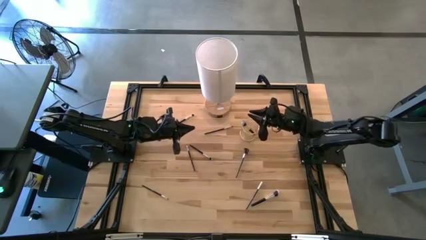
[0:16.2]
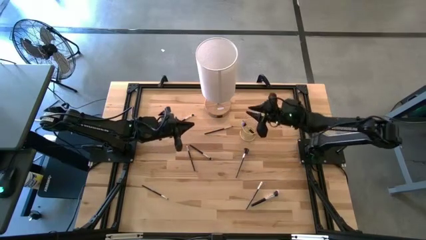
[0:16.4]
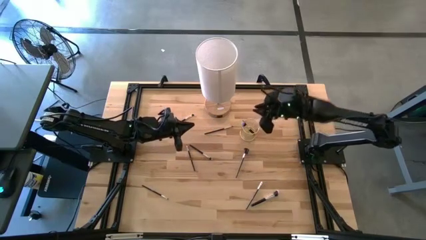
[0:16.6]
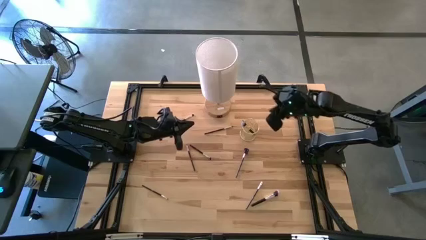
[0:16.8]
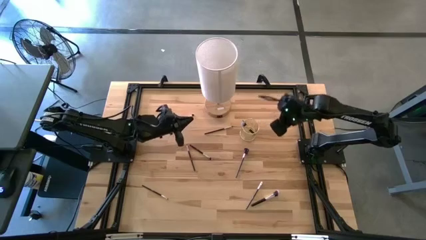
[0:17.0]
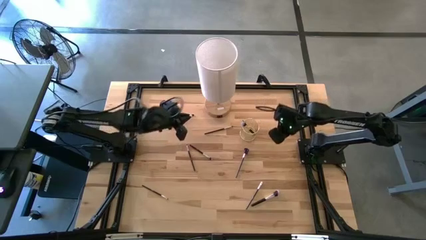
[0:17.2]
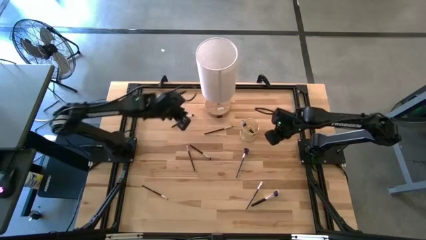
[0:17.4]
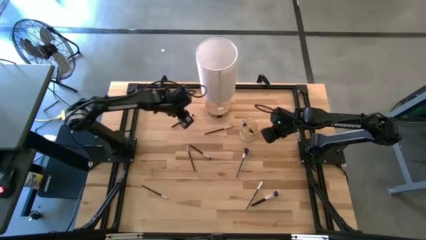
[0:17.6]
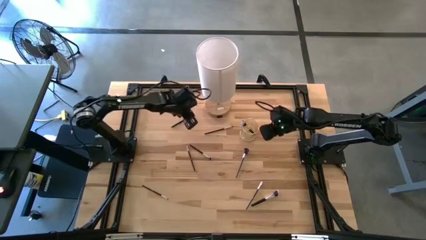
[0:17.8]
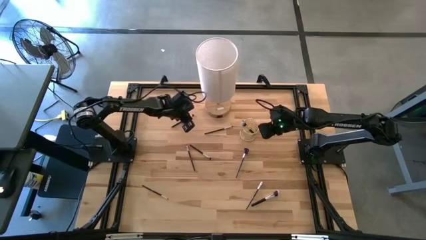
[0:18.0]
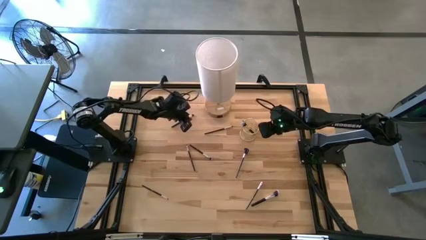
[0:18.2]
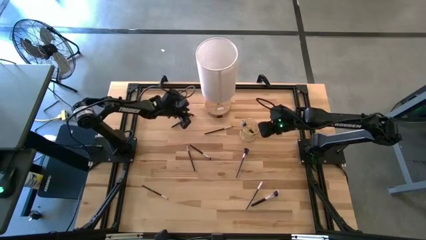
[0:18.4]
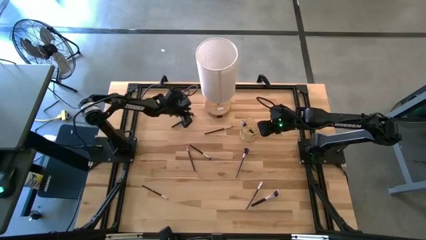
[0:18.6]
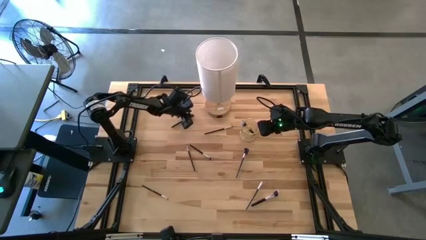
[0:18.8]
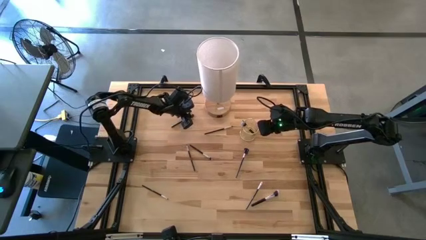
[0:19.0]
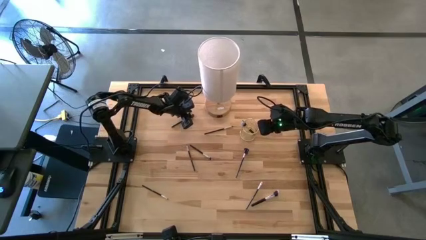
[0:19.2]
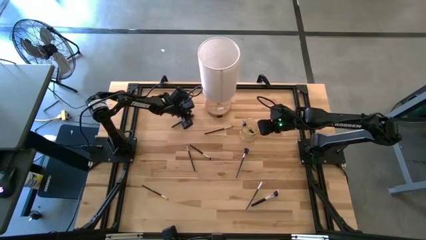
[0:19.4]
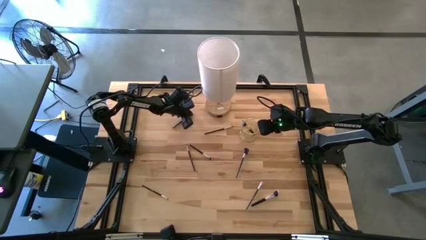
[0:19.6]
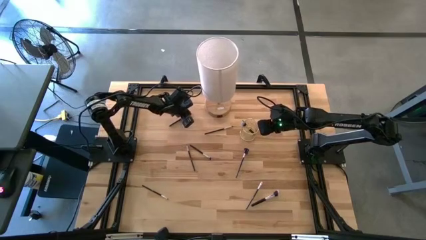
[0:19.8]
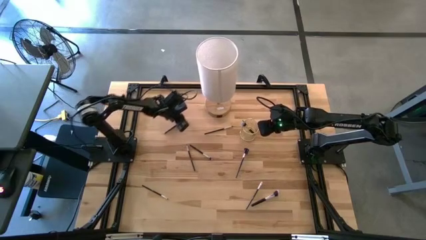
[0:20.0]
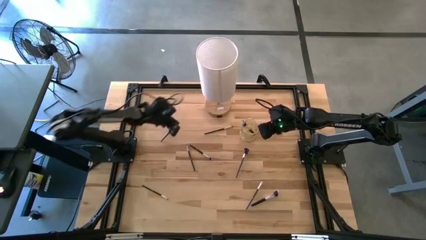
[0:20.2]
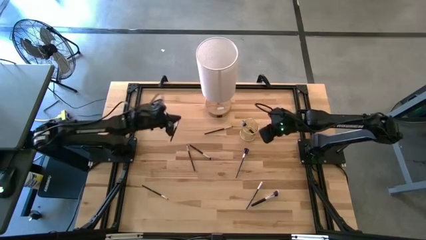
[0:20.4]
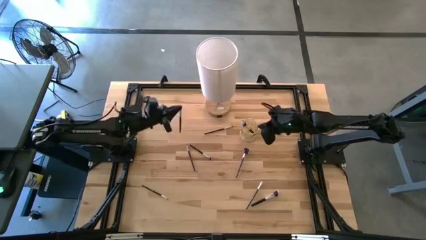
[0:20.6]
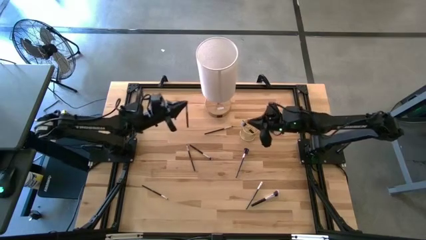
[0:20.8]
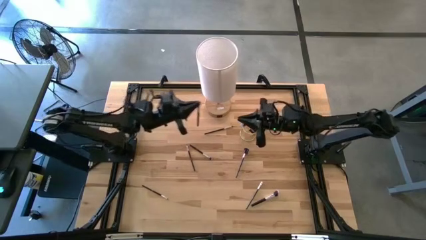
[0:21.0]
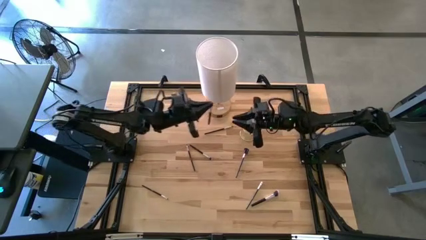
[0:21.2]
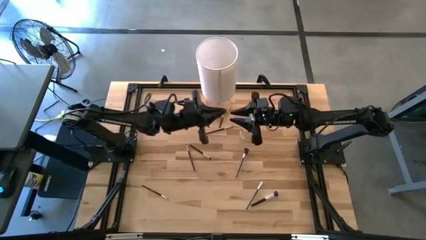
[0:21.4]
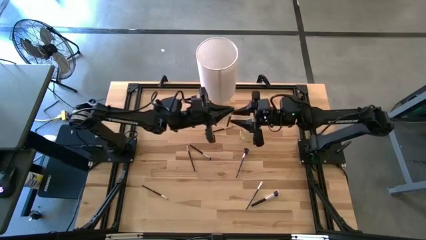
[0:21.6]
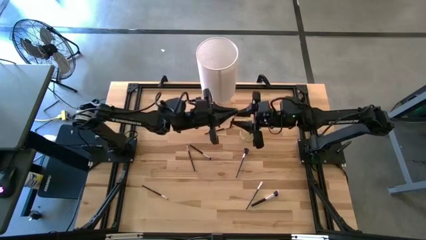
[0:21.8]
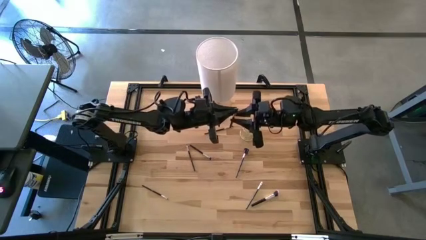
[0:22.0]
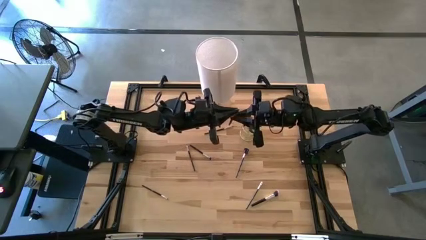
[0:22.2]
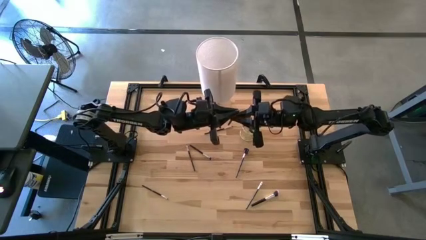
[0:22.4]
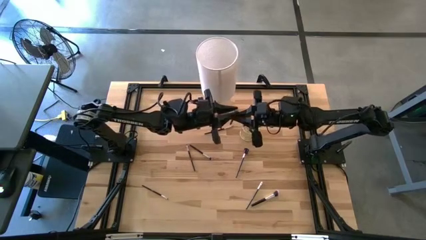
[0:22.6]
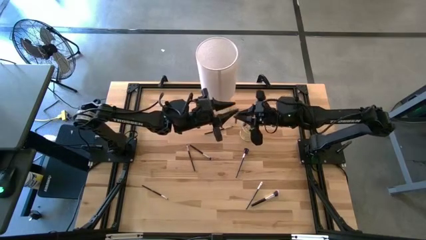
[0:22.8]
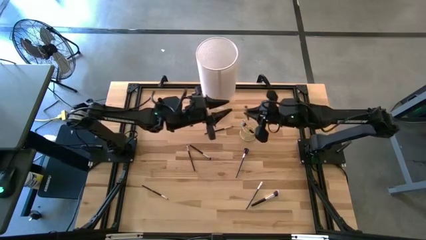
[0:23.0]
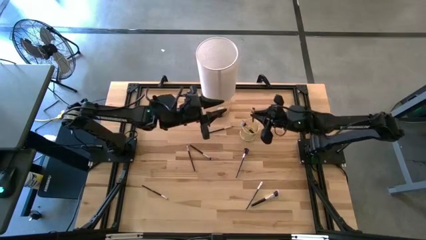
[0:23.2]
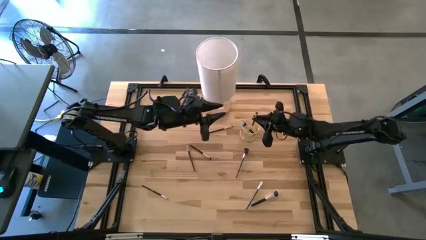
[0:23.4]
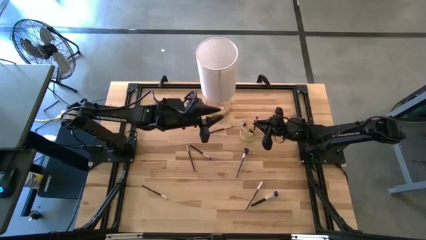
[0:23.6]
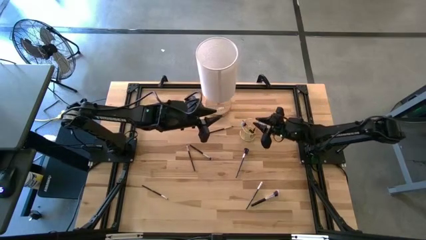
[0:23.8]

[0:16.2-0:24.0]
Task: Pick & Place Makeup Brushes
Put the black eyeshadow brush into the makeup brush holder

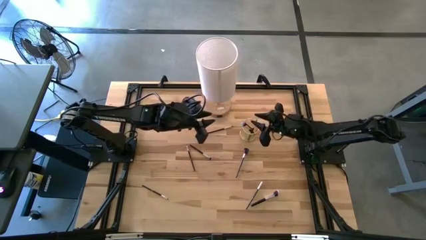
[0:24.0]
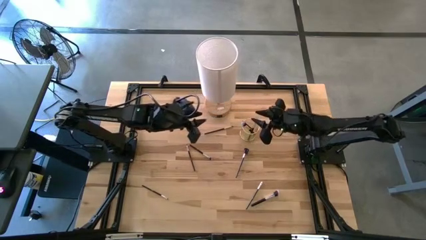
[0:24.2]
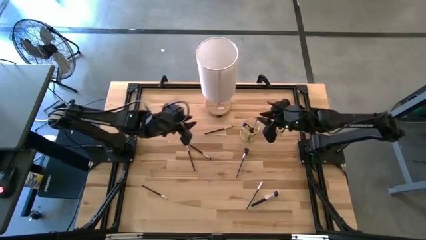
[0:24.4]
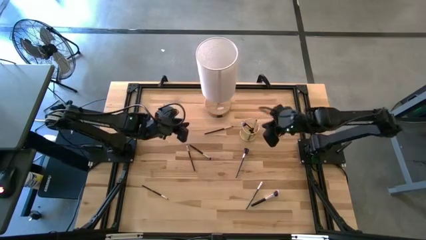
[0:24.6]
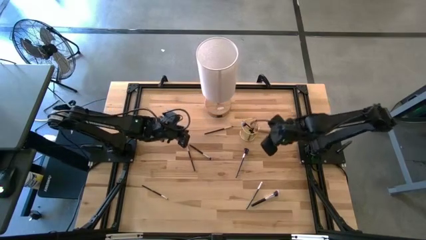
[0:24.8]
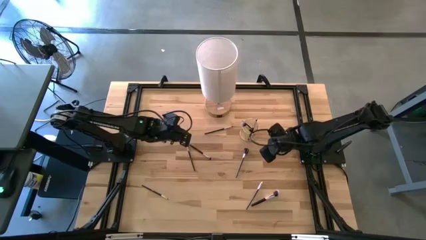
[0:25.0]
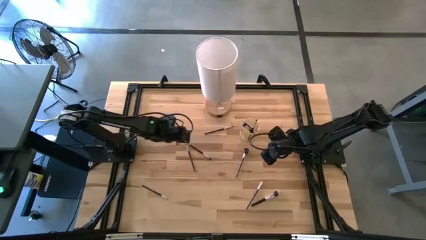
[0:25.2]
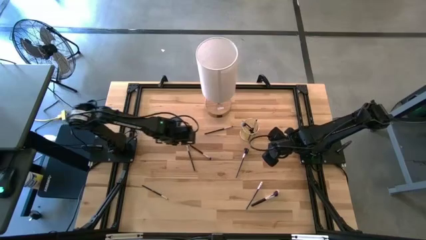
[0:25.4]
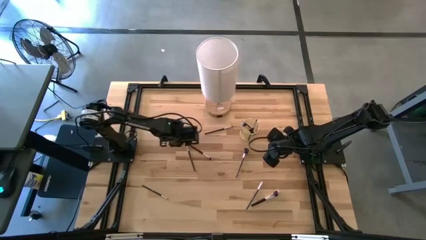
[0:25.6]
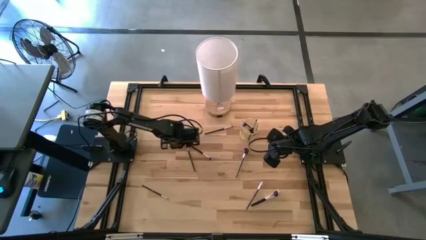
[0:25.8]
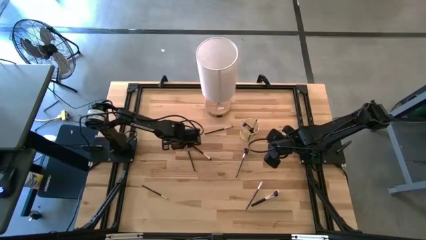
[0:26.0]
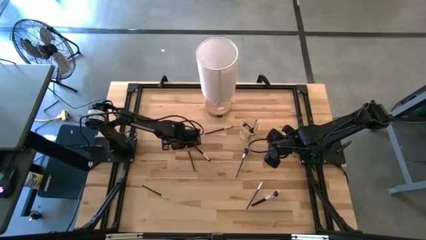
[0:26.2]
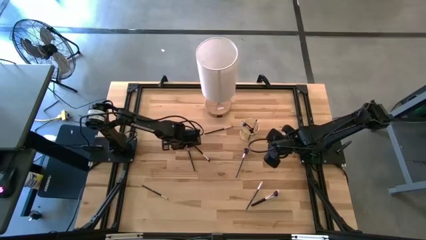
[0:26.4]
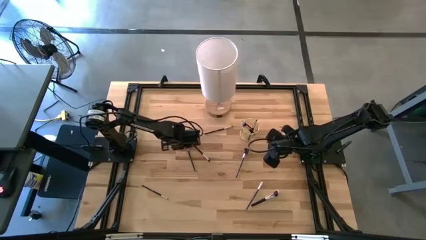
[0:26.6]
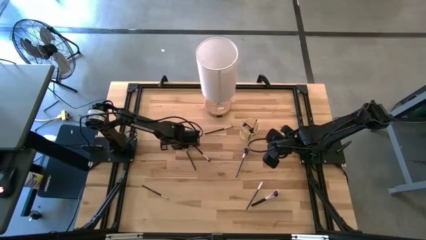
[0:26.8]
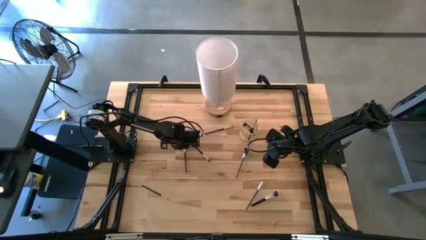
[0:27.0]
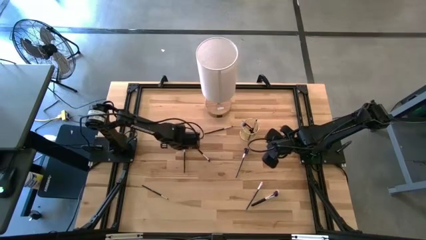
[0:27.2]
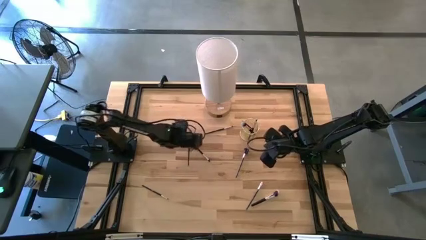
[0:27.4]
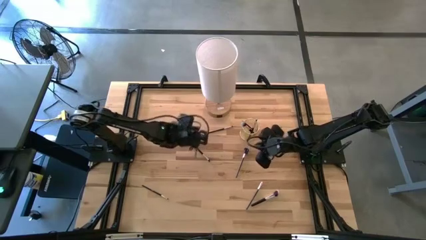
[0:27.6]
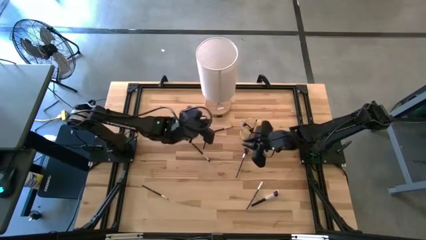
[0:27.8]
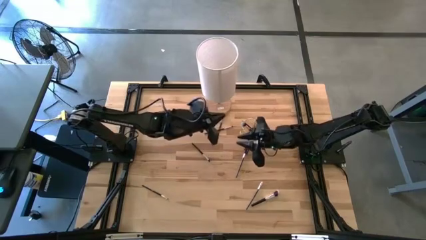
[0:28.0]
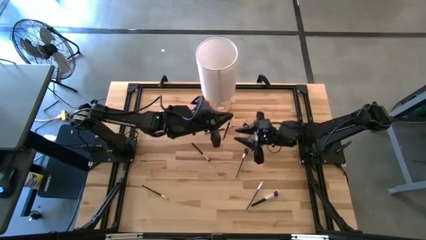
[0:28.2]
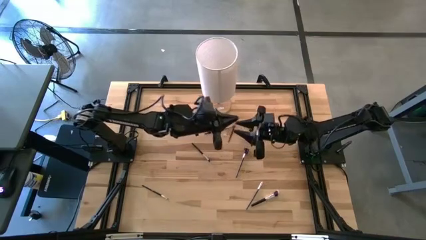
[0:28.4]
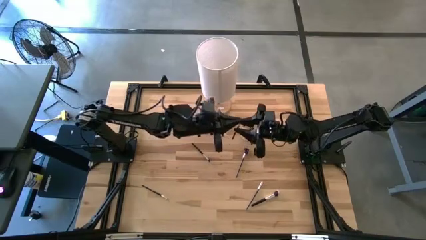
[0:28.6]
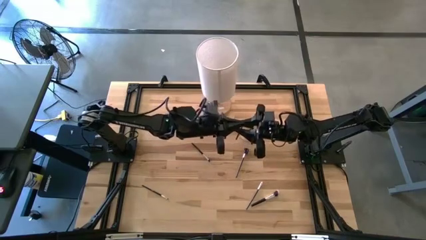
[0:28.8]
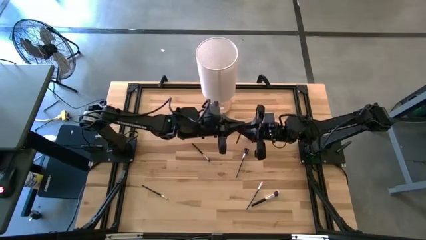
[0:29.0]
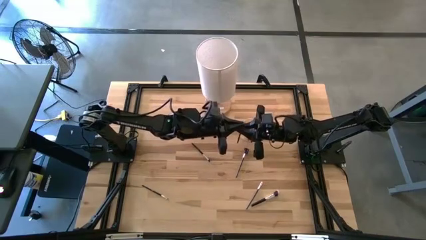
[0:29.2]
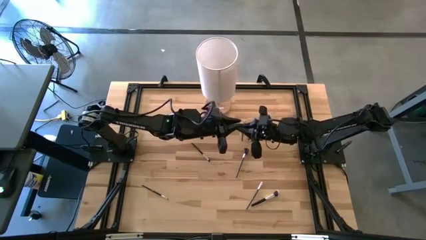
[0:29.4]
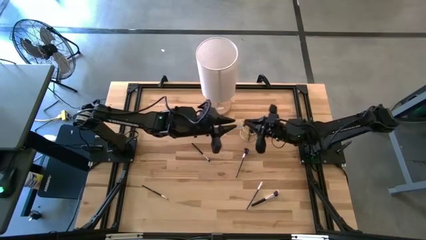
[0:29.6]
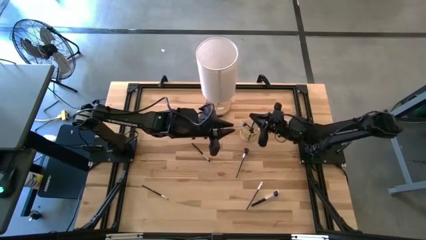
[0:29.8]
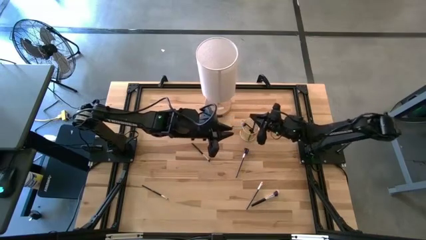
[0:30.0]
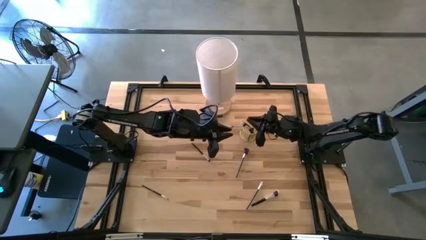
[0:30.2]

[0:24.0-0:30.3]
Put the black eyeshadow brush into the makeup brush holder

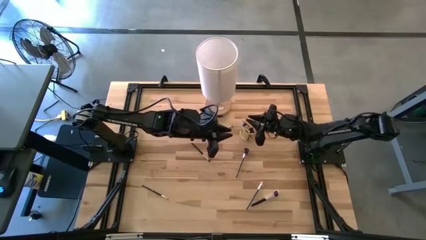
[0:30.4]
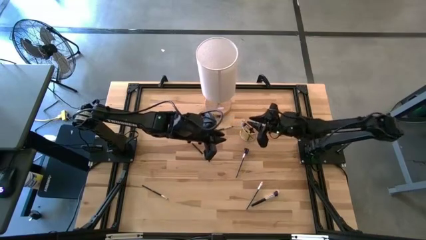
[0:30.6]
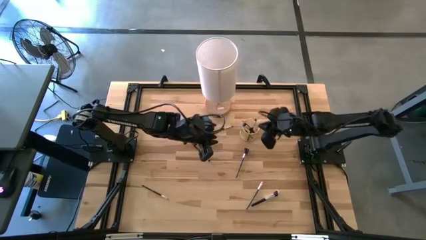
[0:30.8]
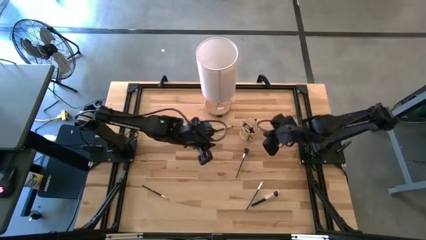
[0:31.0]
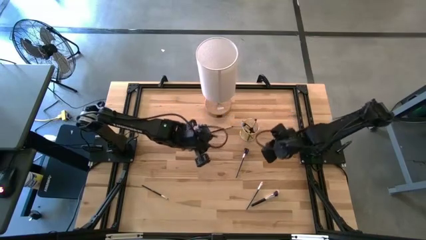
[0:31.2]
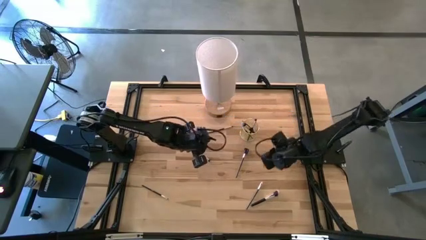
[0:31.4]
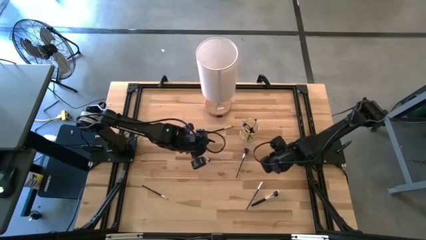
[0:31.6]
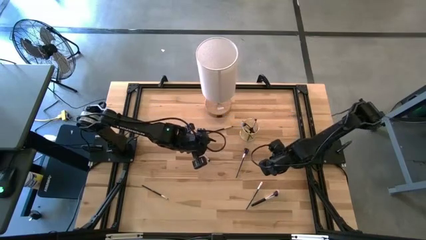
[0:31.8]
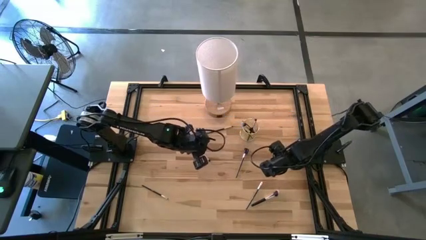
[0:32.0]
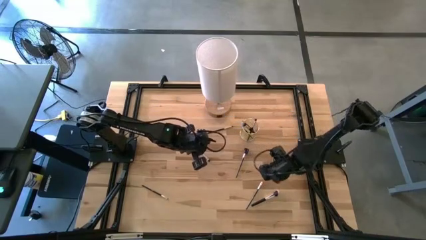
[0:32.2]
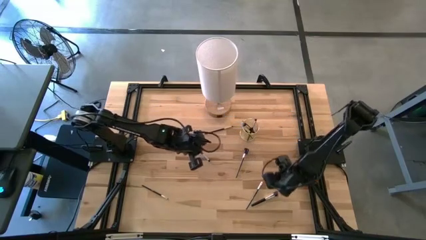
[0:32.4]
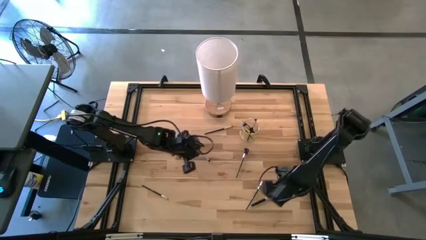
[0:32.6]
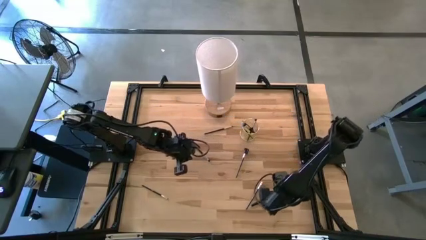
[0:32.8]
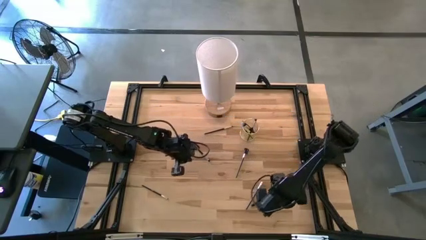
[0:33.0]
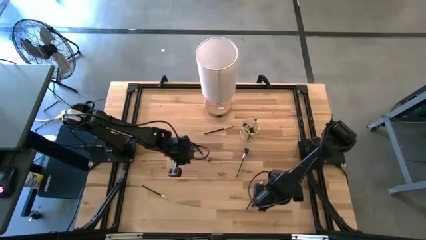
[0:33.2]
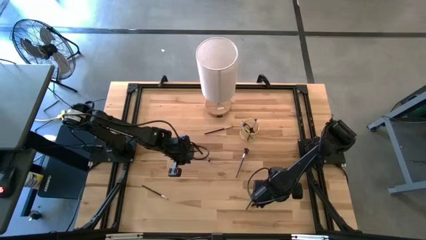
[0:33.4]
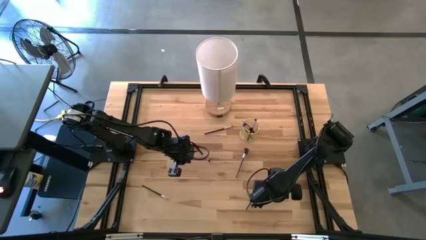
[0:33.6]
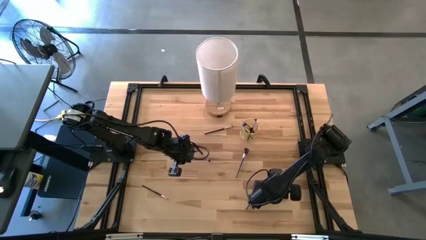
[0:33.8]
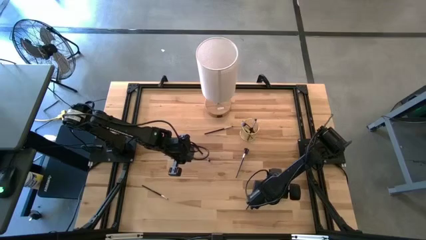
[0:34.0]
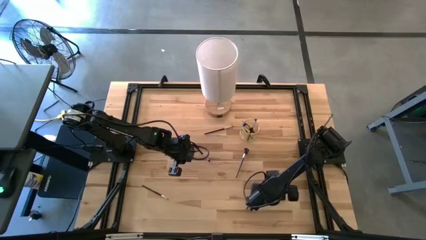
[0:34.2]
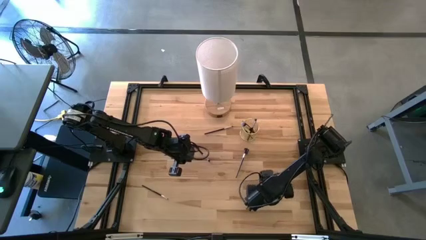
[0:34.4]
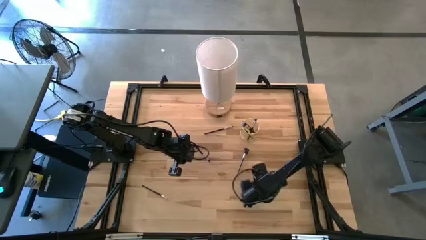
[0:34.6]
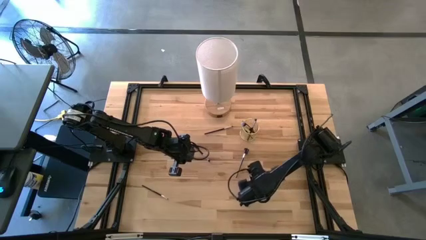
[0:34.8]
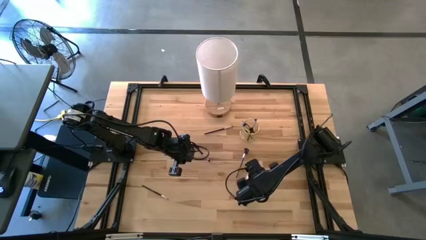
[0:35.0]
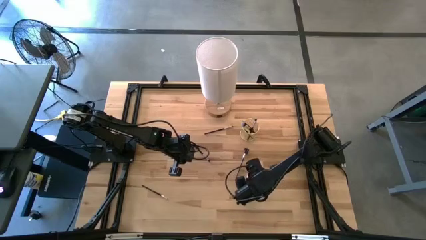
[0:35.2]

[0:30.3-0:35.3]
Put the black powder brush into the makeup brush holder
